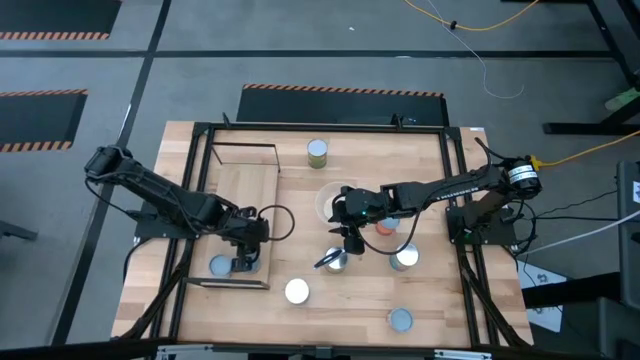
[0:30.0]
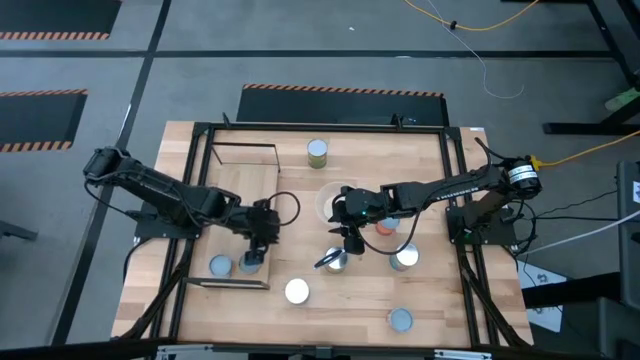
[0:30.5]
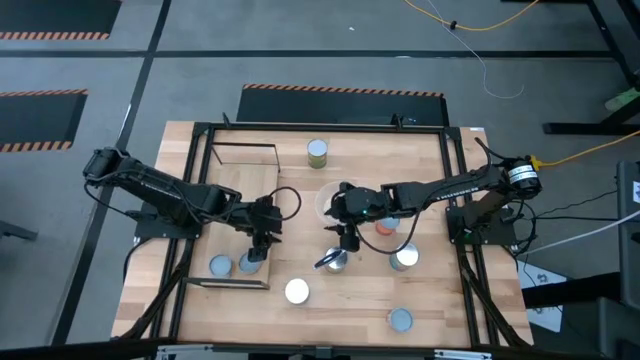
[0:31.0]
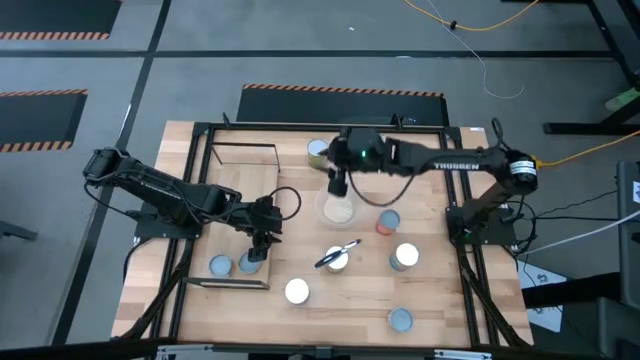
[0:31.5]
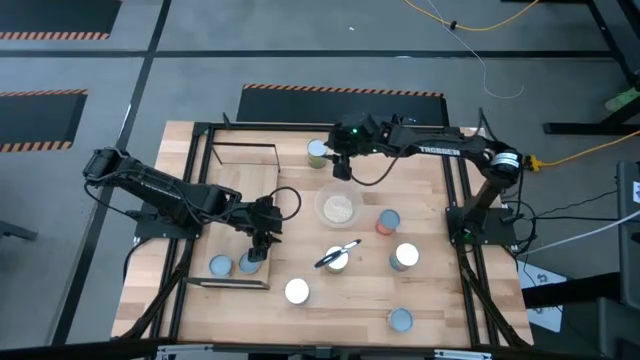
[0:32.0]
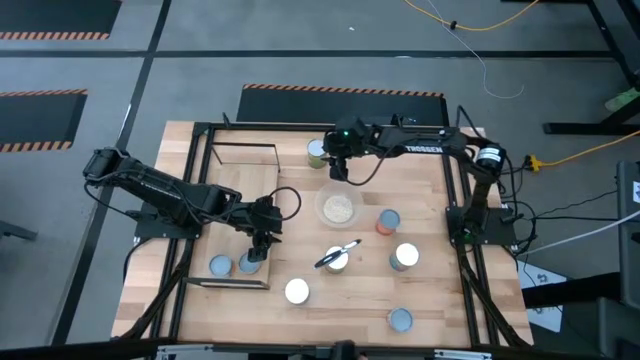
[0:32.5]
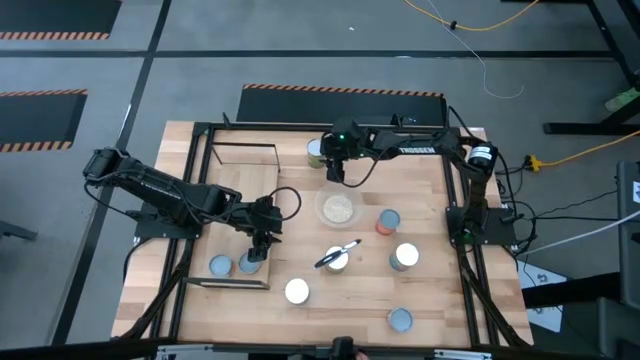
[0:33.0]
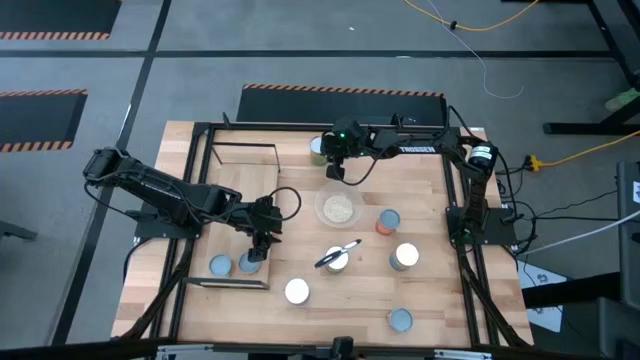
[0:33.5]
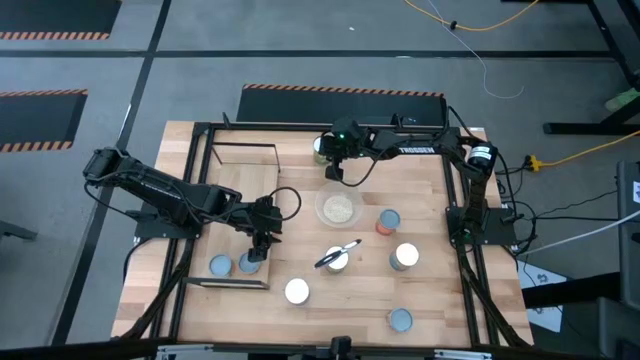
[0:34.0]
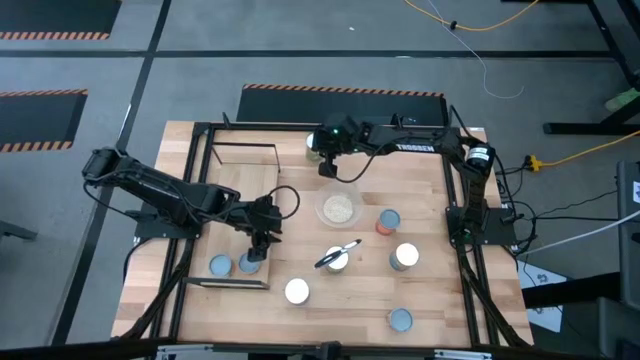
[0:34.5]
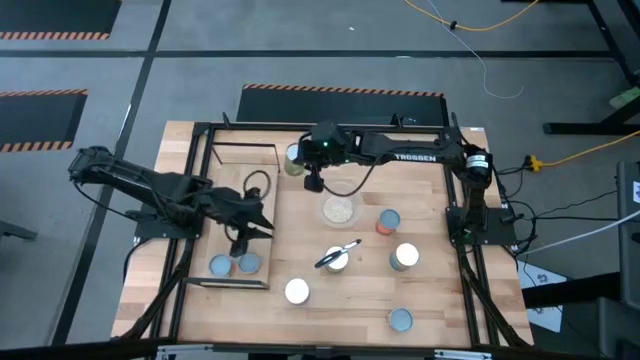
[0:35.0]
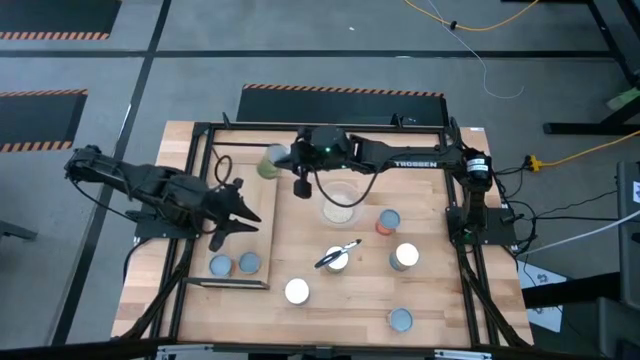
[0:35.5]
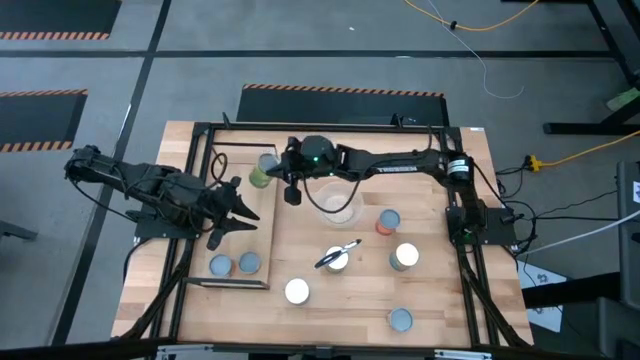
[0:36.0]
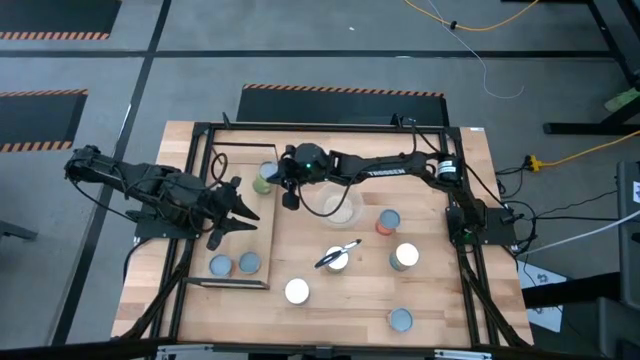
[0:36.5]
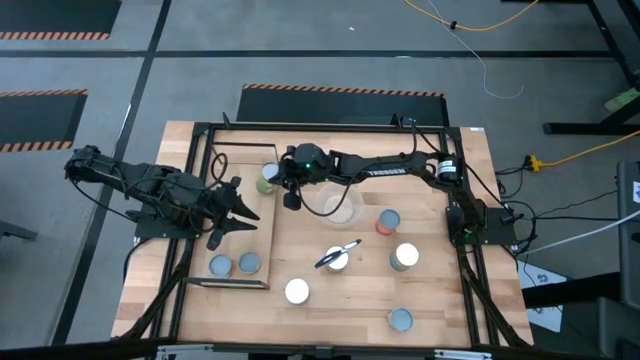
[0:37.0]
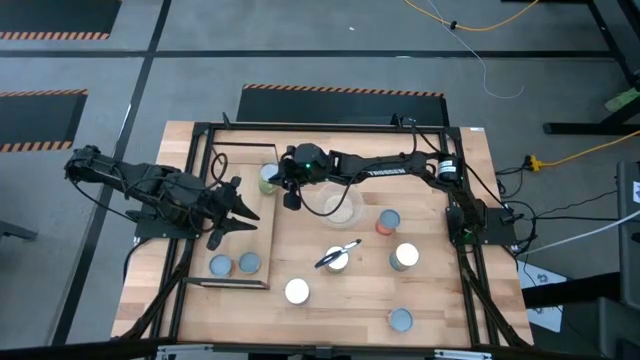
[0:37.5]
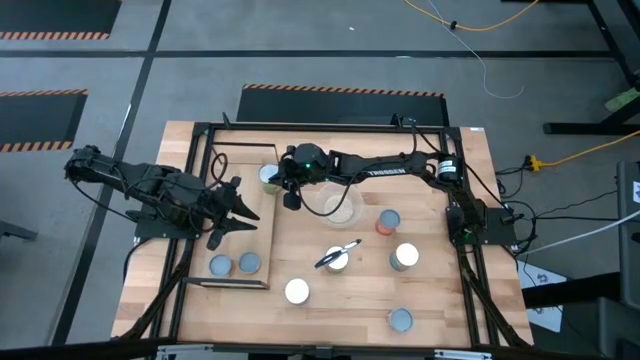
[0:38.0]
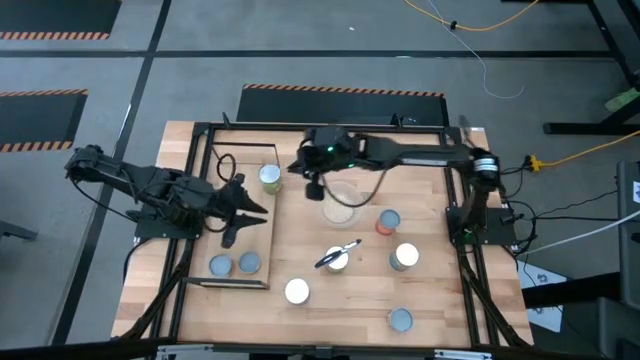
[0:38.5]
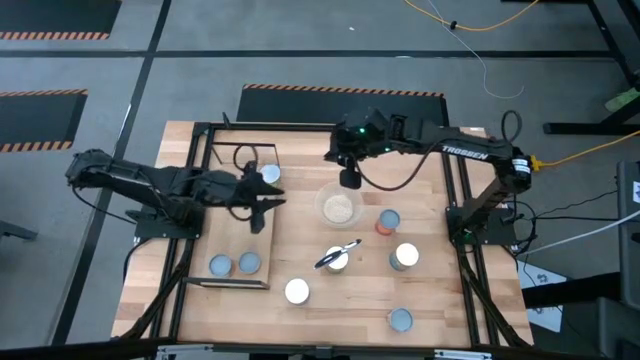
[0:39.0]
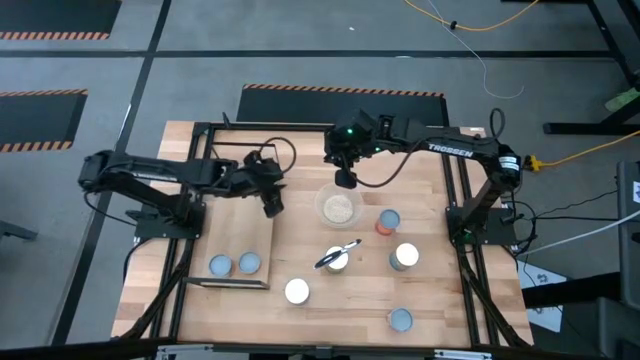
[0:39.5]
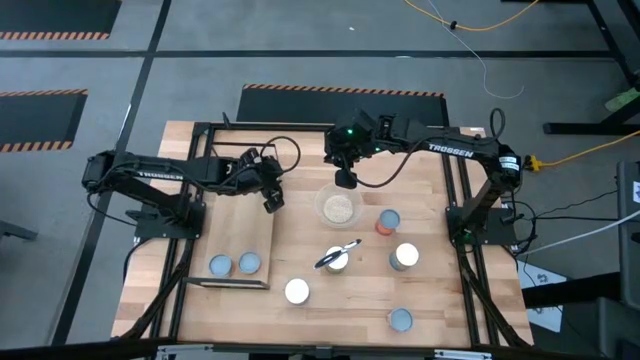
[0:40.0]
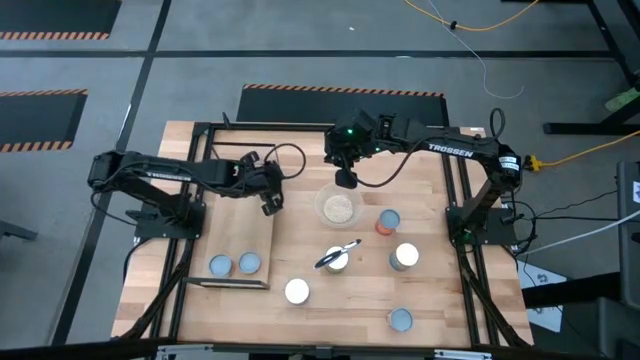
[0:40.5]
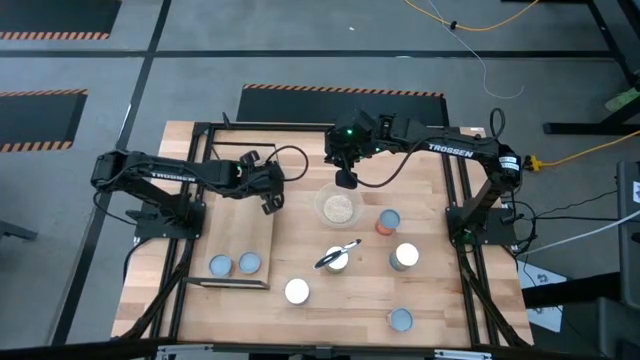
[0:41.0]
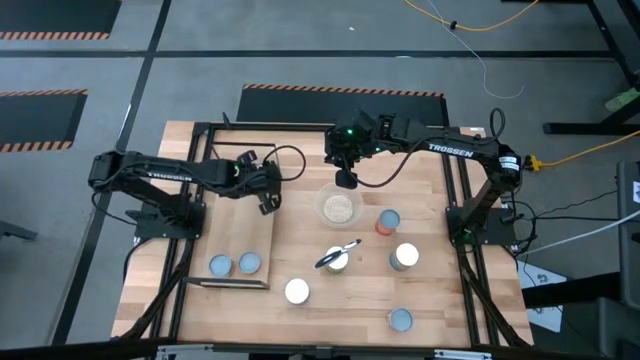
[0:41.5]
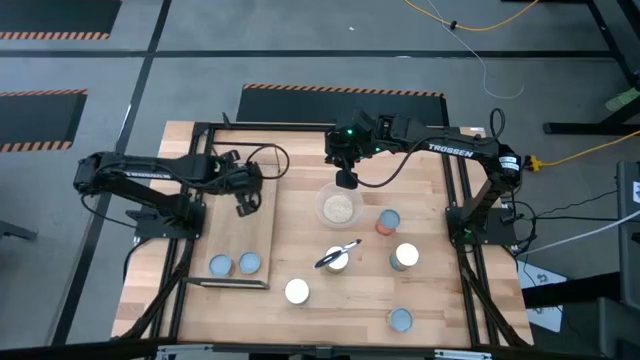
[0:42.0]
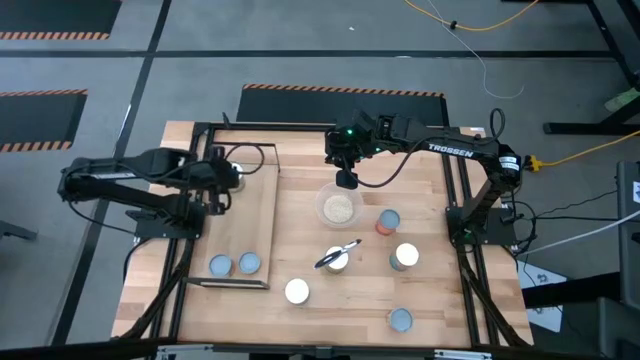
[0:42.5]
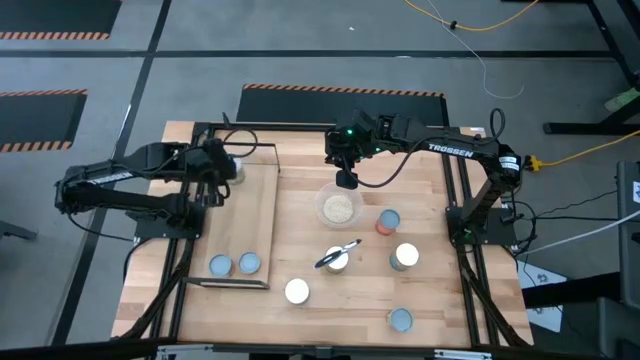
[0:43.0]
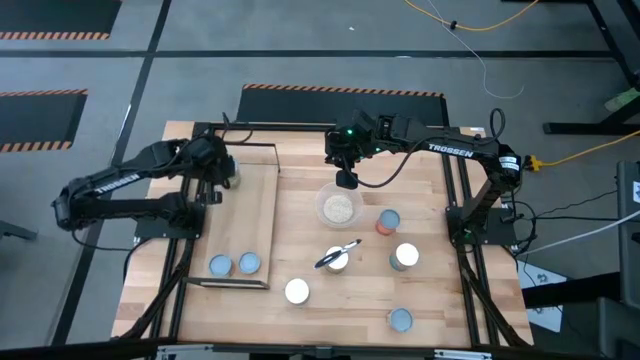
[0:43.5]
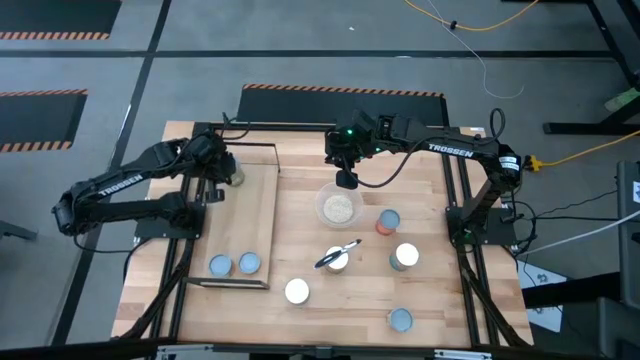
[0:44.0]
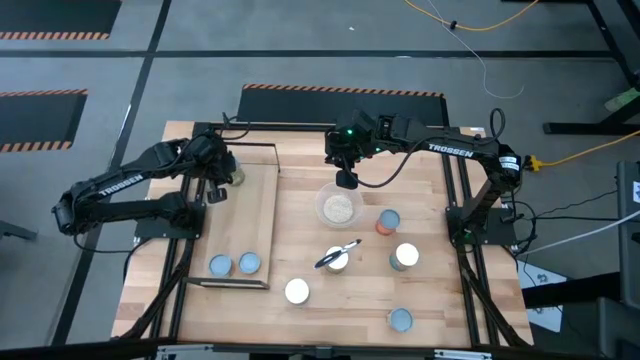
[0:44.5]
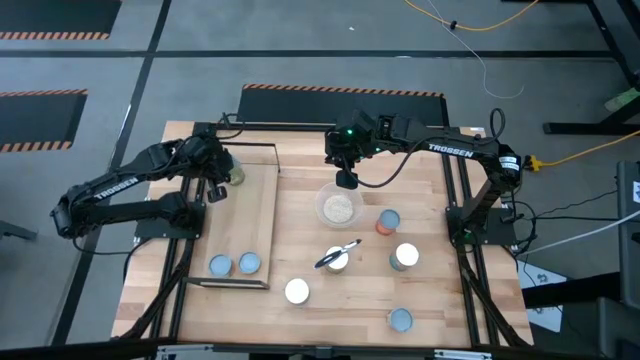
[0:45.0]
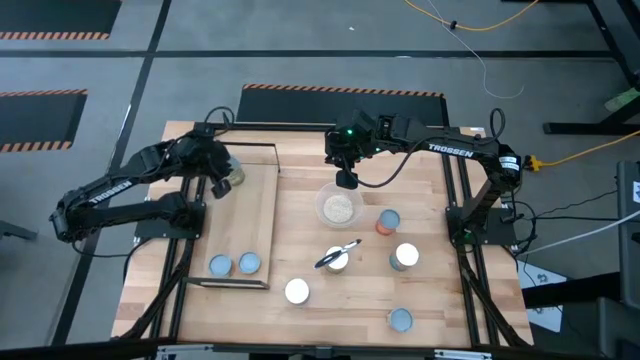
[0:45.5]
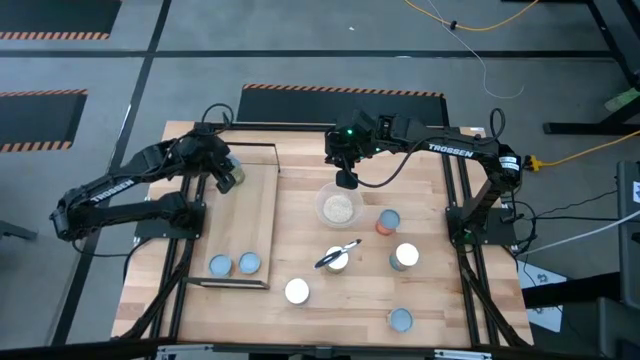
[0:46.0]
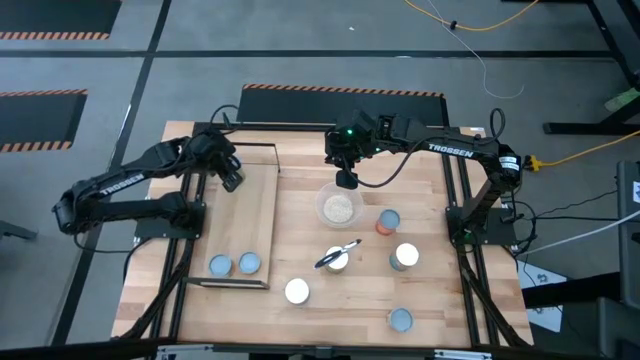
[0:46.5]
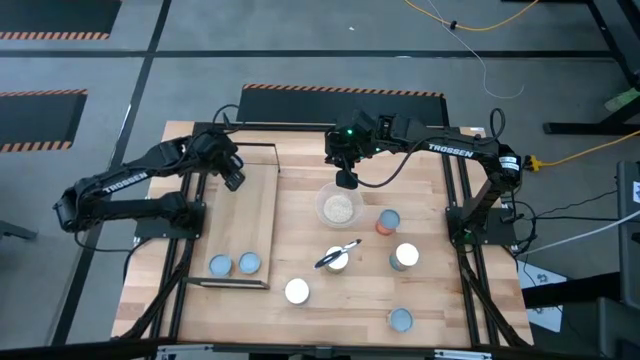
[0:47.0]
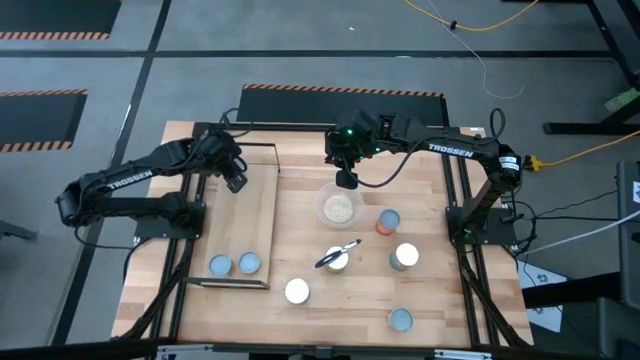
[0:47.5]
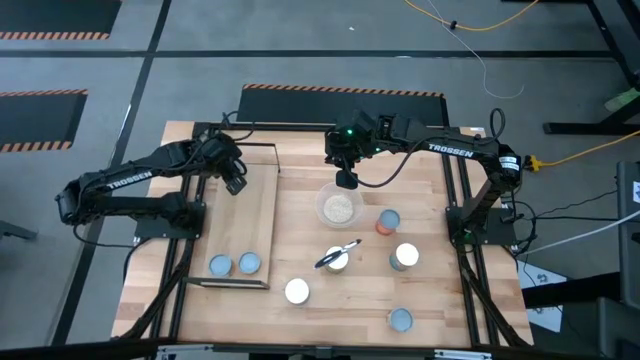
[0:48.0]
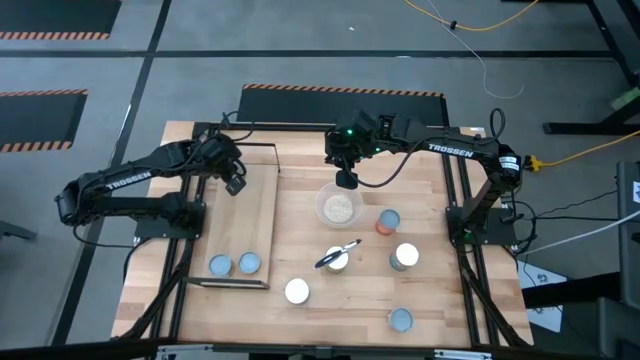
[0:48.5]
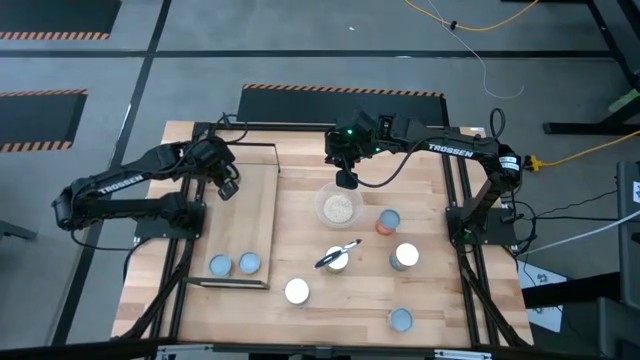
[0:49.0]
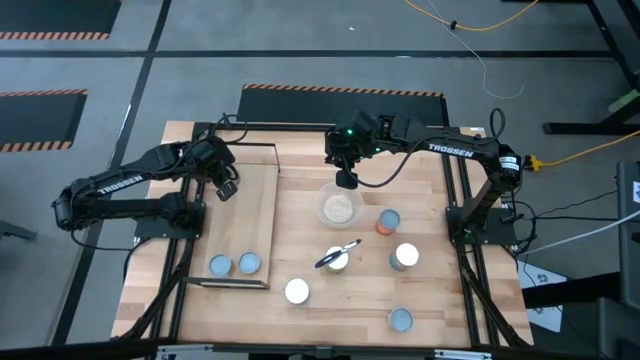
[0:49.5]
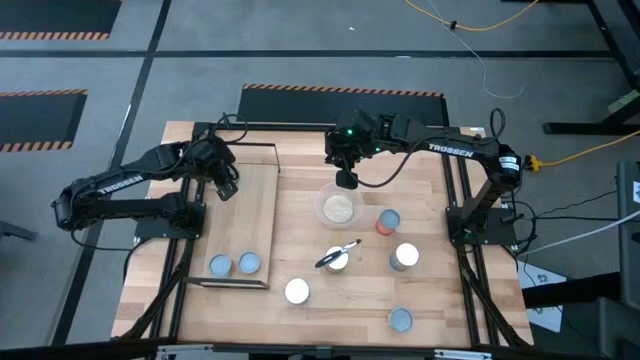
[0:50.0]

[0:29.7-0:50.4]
Task: Pick and place cans onto a shelf
Put the canned pears on the shelf
